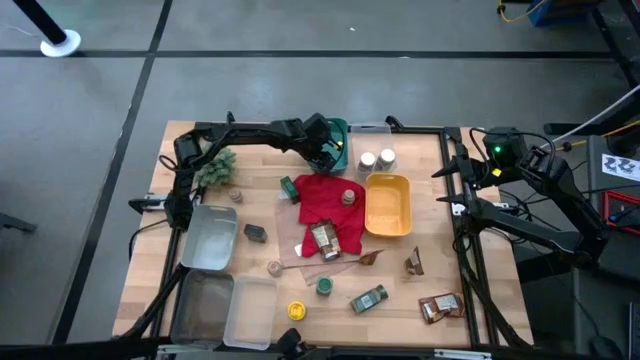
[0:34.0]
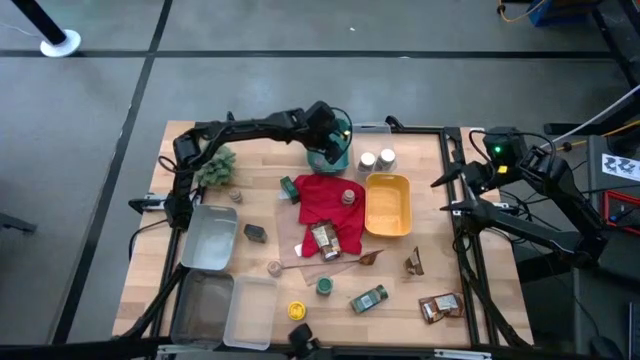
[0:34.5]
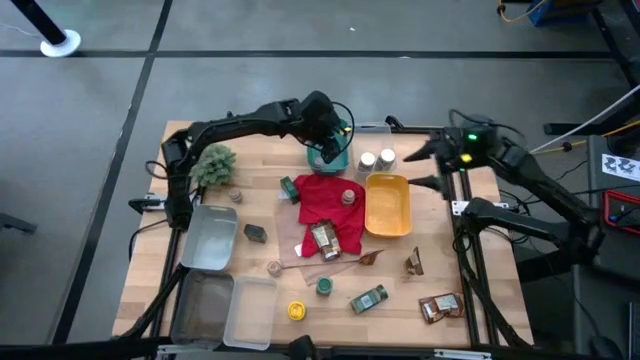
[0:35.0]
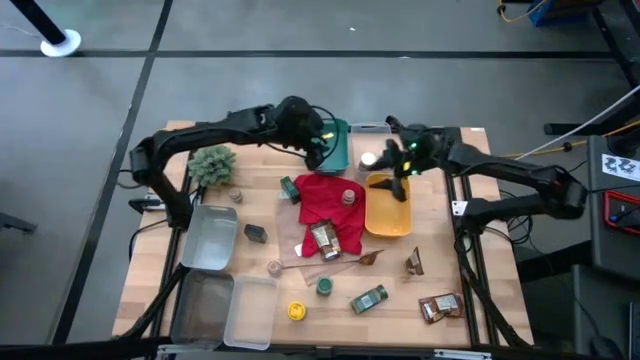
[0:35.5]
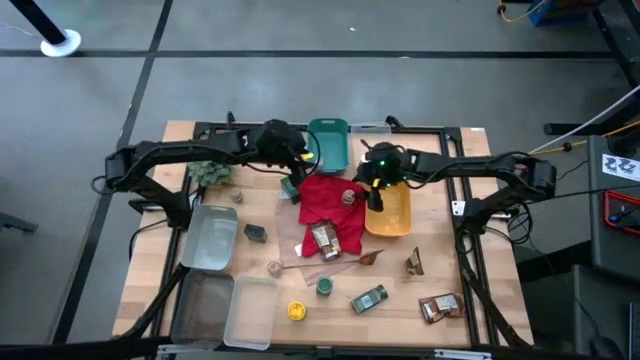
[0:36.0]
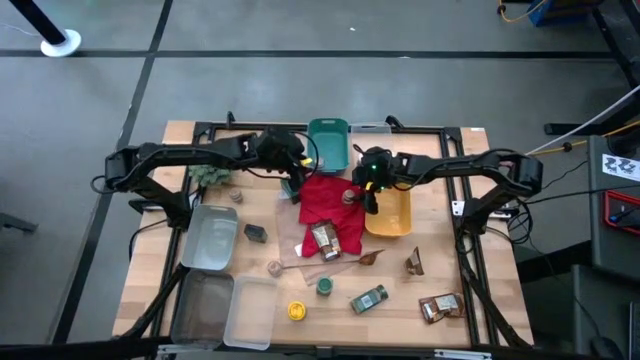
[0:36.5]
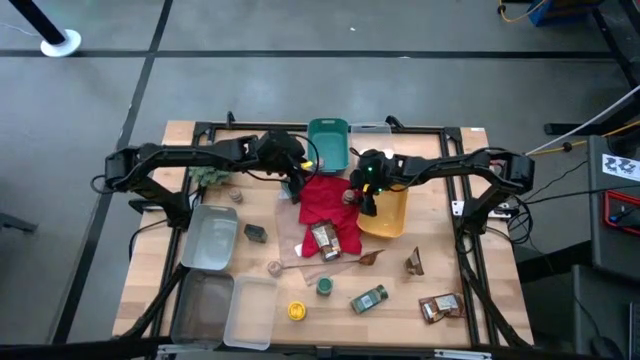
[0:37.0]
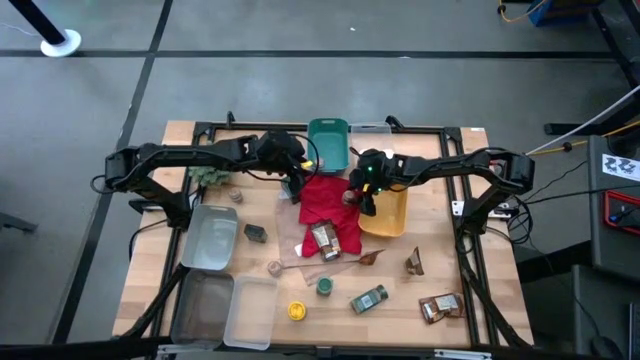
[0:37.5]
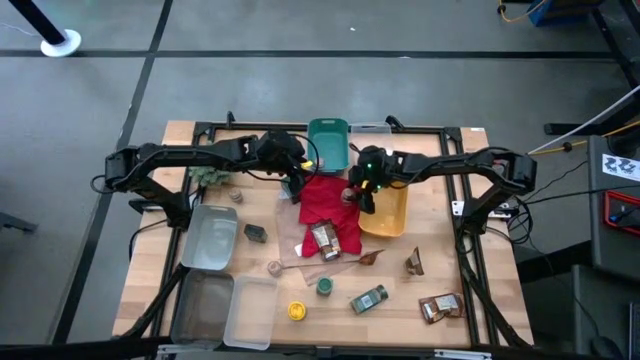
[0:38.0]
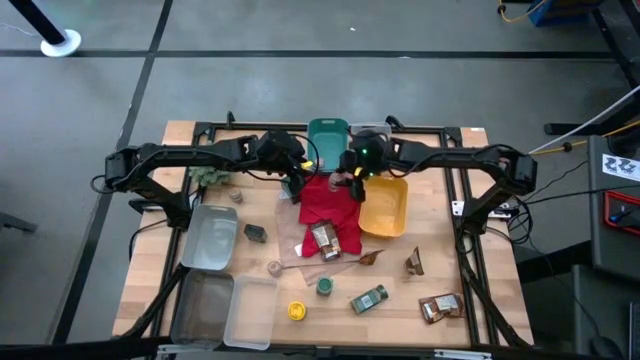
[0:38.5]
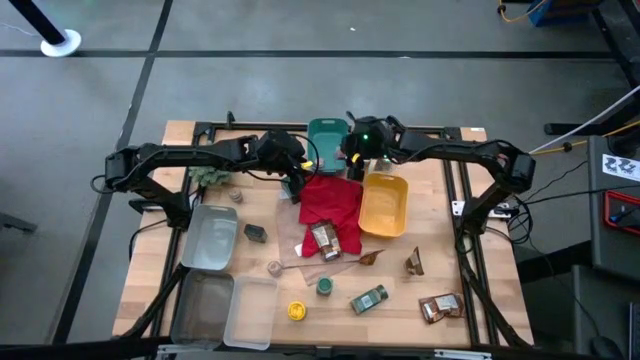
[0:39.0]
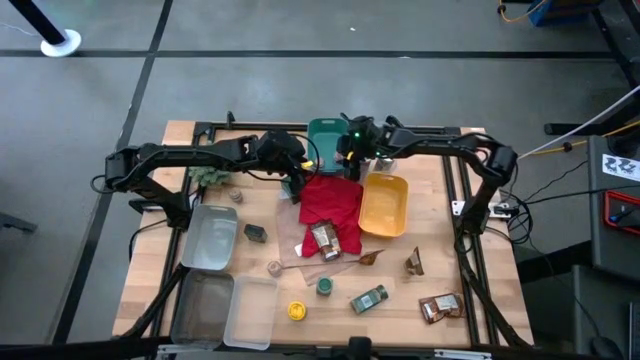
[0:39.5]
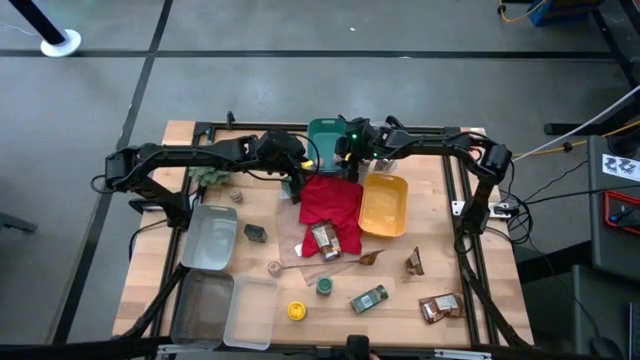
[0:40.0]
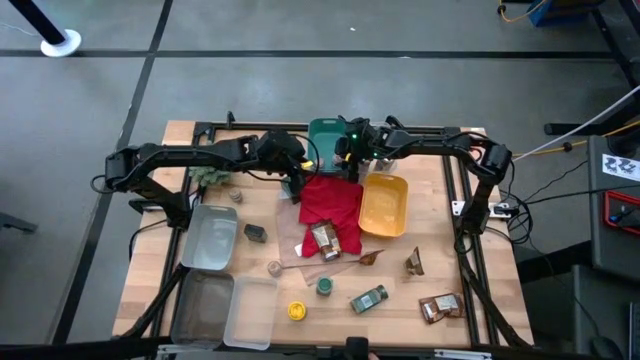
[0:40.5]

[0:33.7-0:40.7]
Task: Sort spices by type
Put the right brown seasoning bottle into the green bin

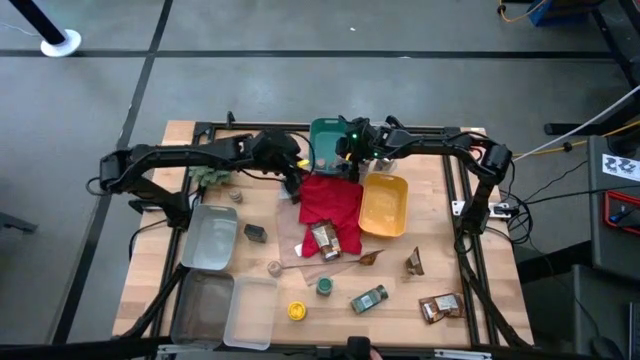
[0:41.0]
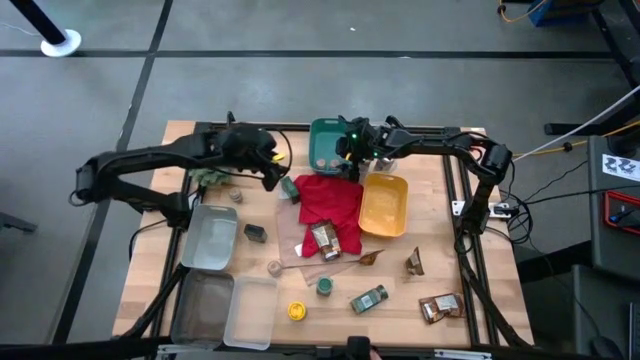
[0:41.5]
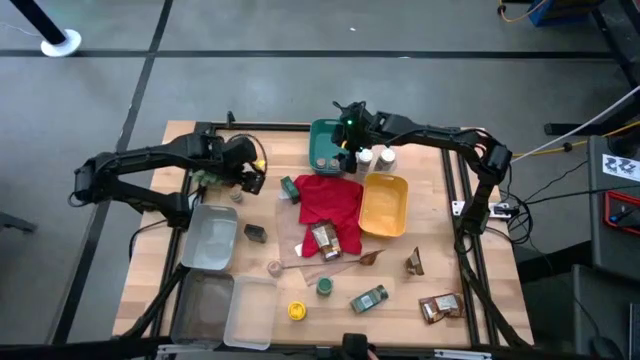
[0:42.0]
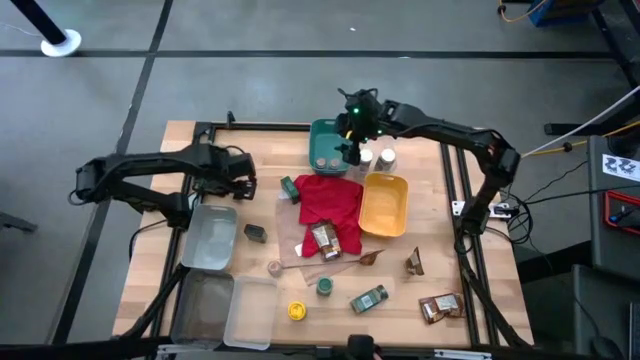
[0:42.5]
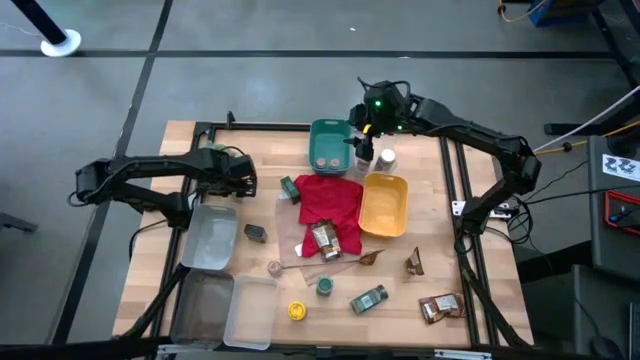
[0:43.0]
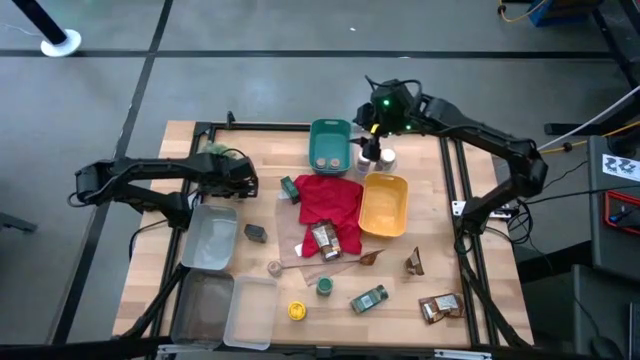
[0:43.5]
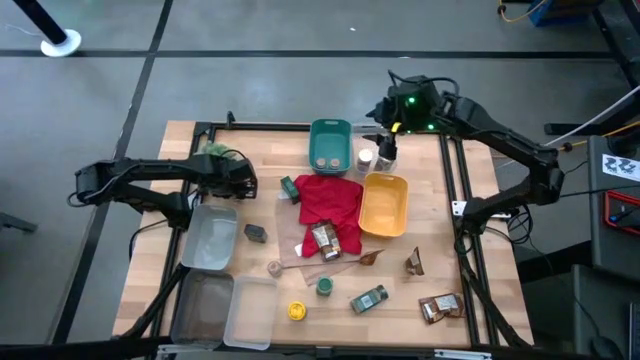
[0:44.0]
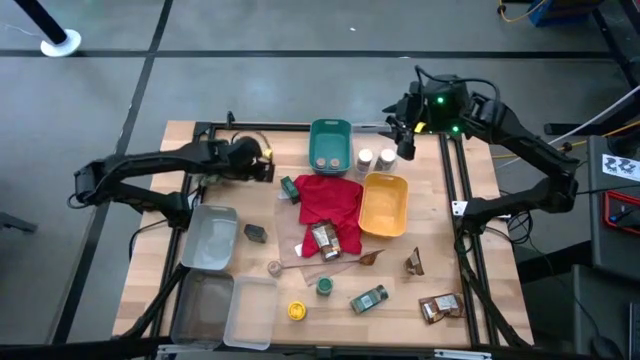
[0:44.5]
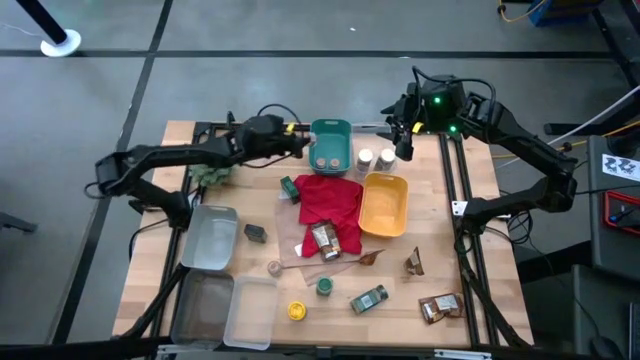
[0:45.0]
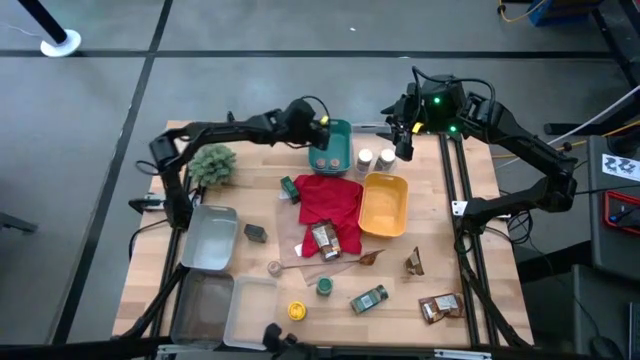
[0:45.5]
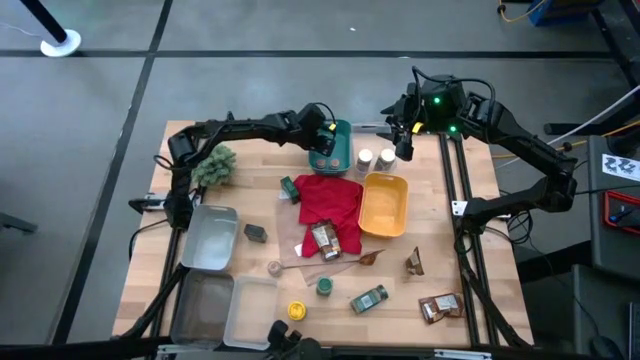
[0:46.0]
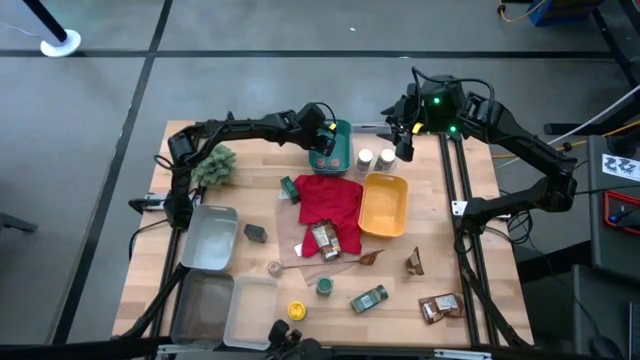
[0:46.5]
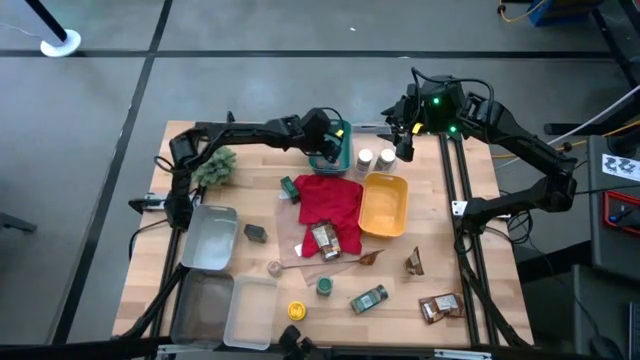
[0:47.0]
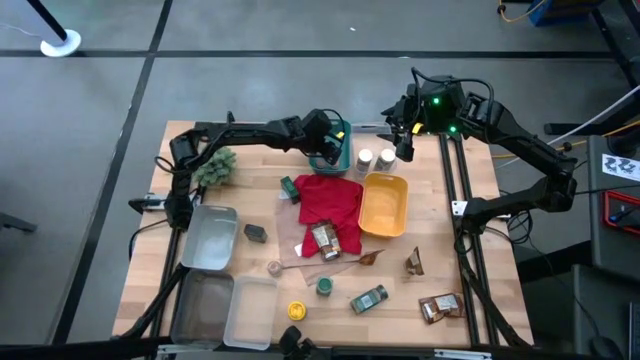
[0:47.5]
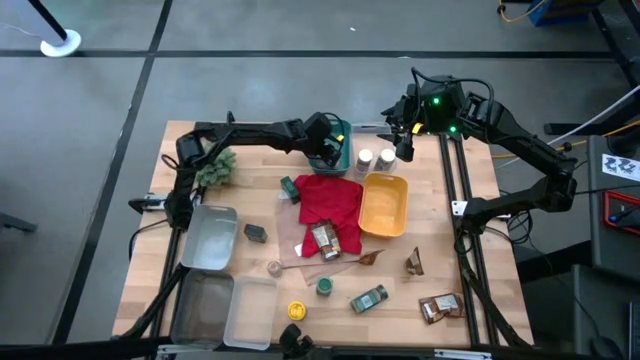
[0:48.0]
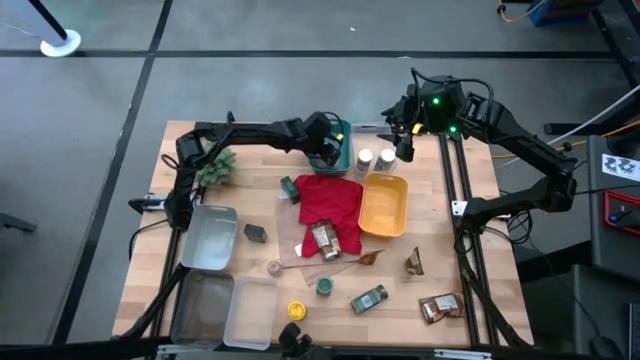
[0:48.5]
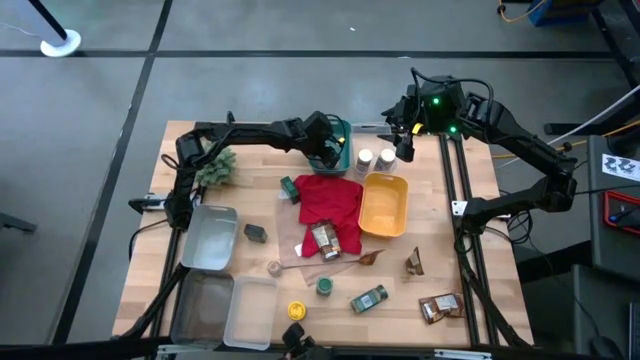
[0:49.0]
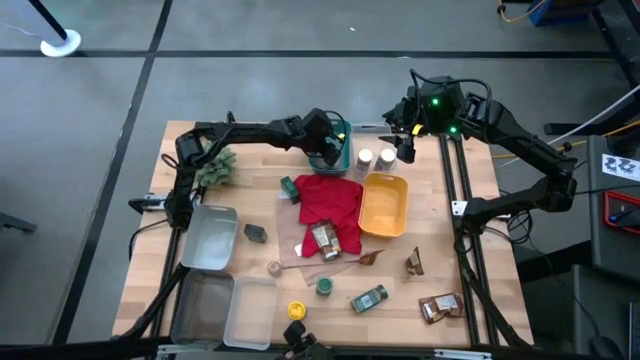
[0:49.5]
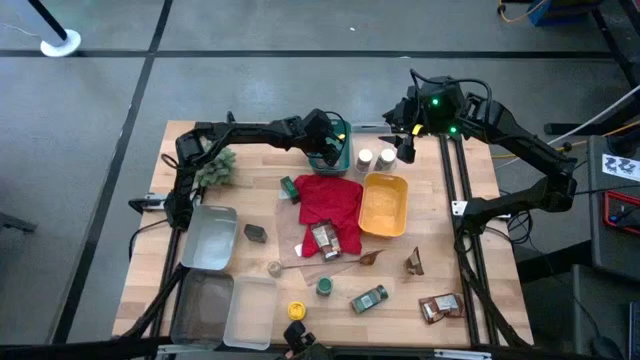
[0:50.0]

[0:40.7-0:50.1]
Put the brown seasoning bottle into the green bin

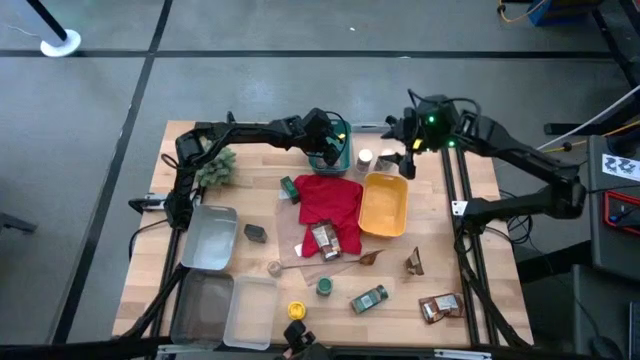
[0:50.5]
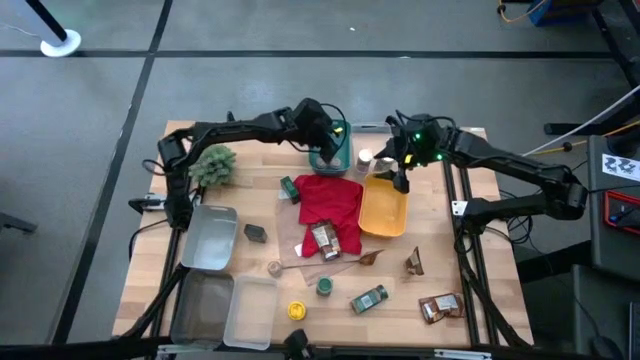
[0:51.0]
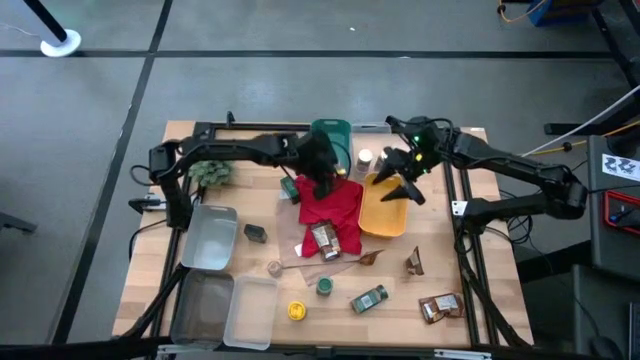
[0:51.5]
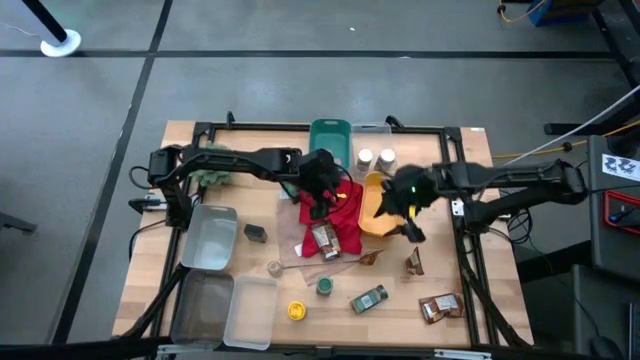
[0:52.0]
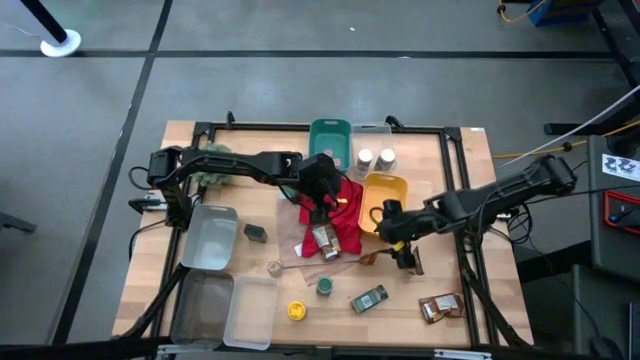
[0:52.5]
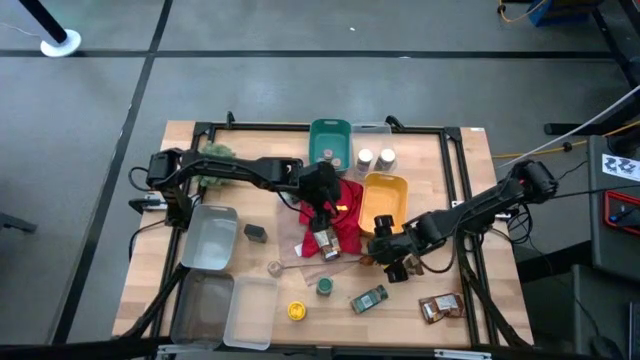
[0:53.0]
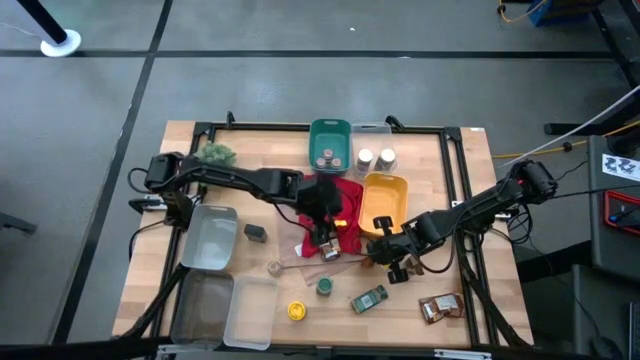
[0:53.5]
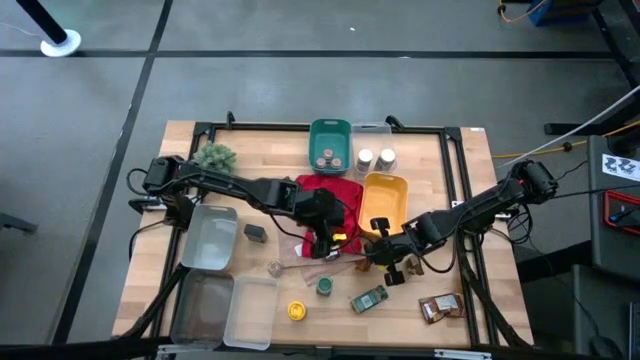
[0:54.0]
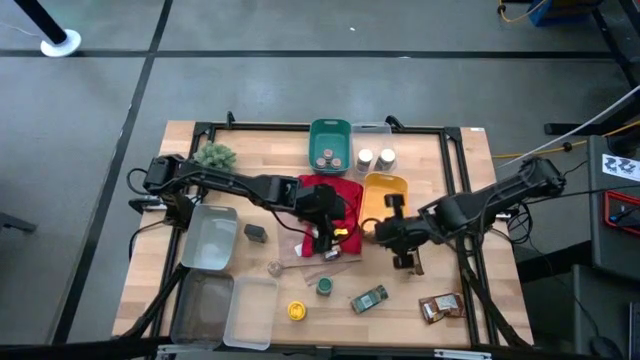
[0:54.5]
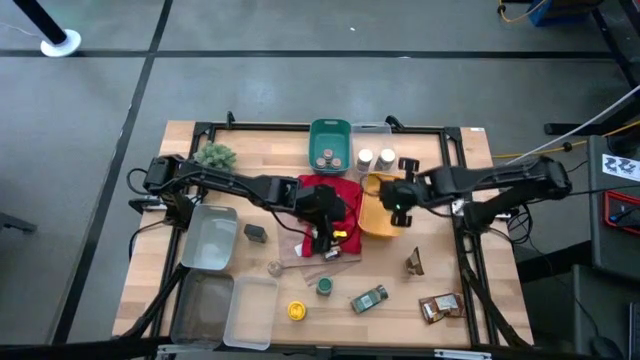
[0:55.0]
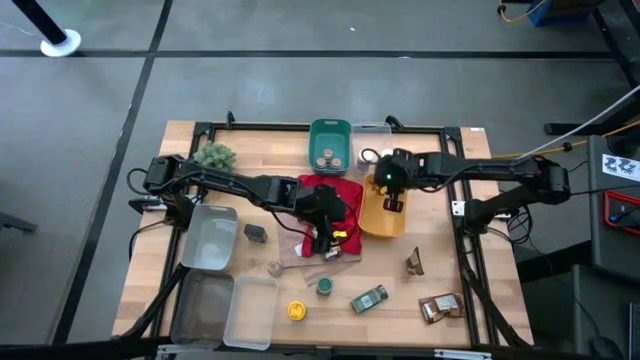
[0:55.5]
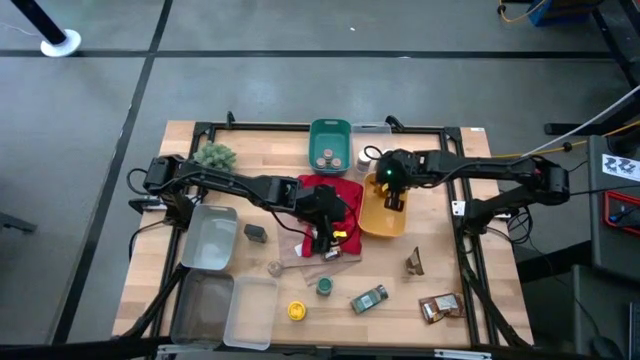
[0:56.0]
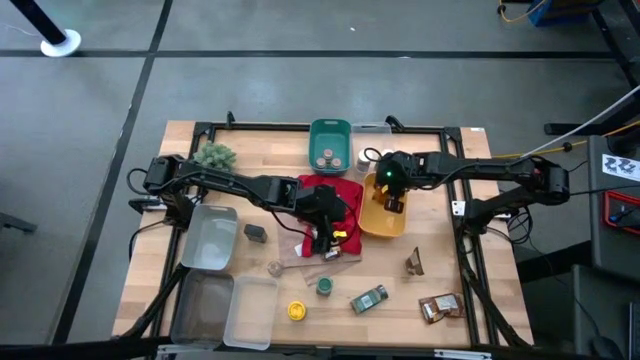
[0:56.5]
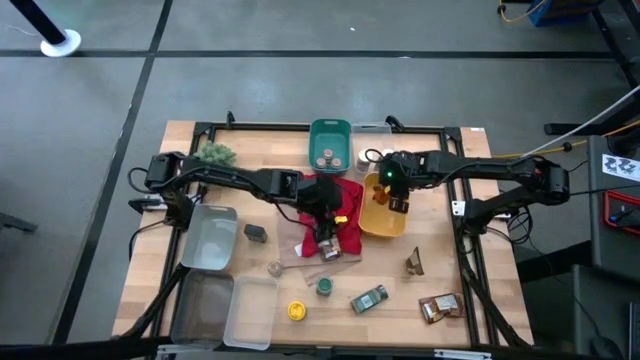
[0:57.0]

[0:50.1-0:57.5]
Put the center brown seasoning sachet into the yellow bin
